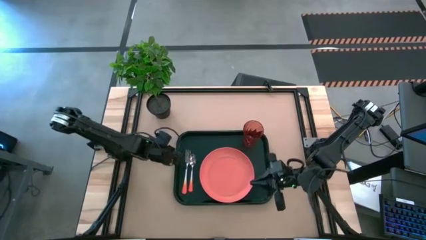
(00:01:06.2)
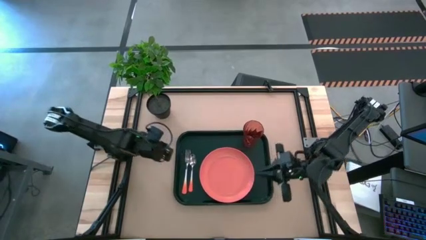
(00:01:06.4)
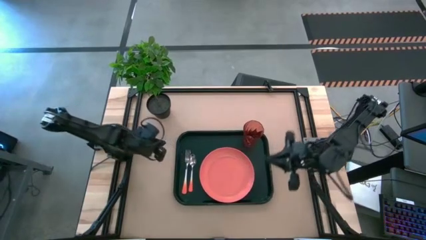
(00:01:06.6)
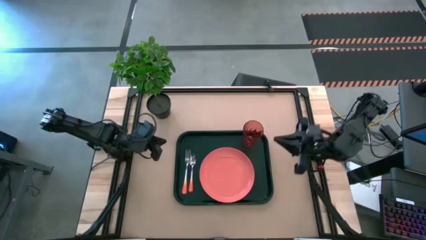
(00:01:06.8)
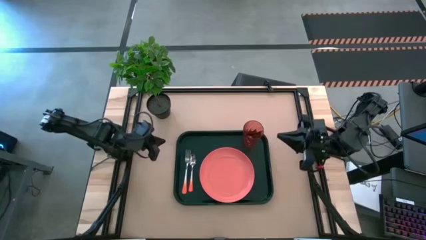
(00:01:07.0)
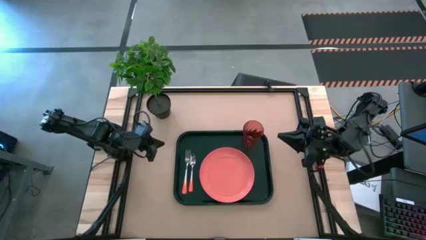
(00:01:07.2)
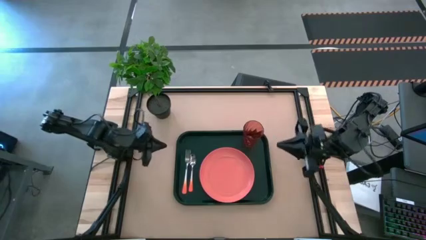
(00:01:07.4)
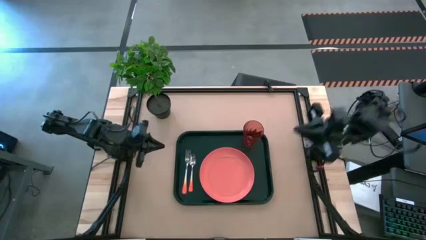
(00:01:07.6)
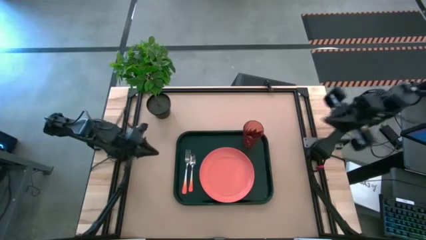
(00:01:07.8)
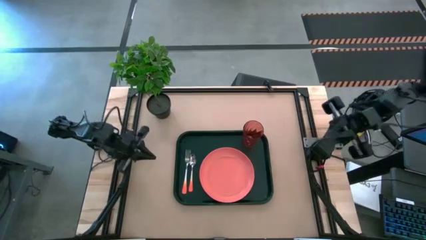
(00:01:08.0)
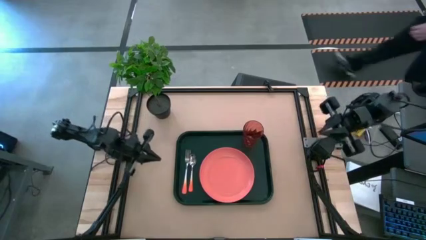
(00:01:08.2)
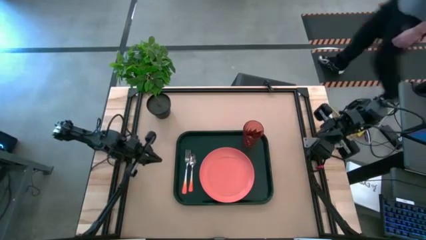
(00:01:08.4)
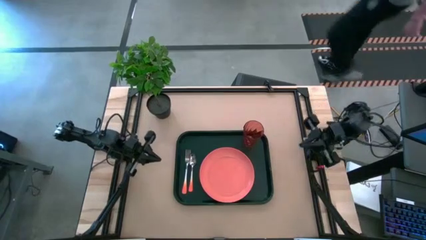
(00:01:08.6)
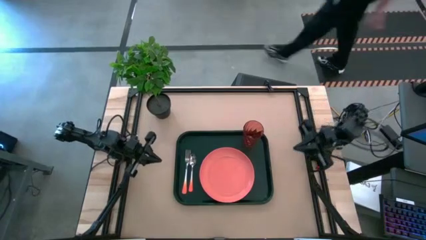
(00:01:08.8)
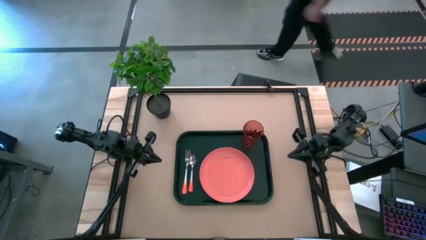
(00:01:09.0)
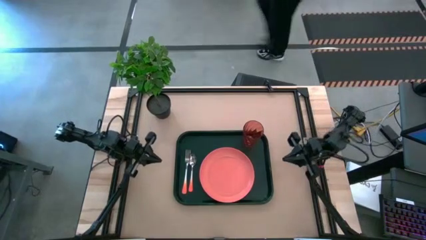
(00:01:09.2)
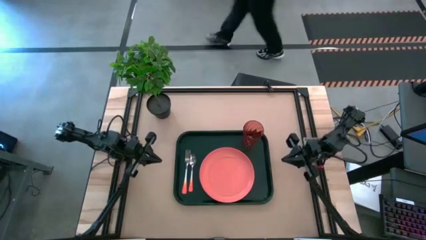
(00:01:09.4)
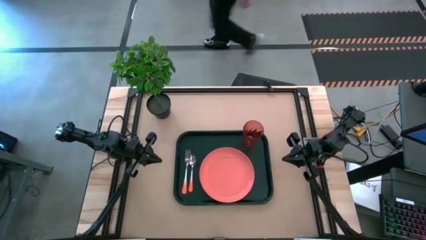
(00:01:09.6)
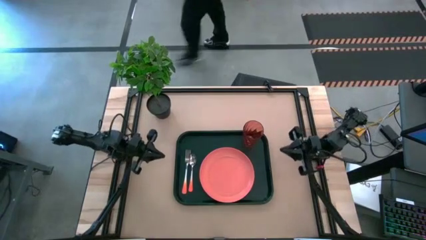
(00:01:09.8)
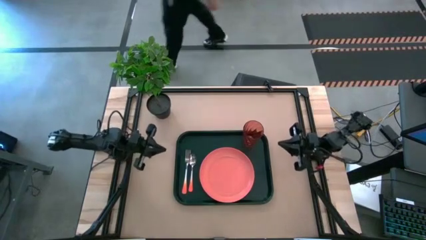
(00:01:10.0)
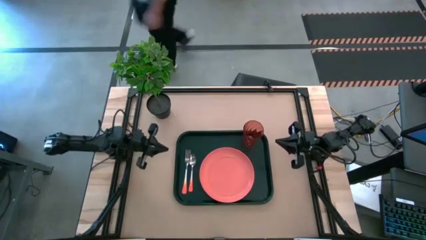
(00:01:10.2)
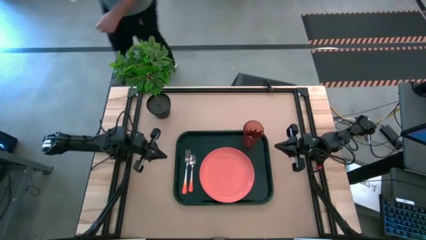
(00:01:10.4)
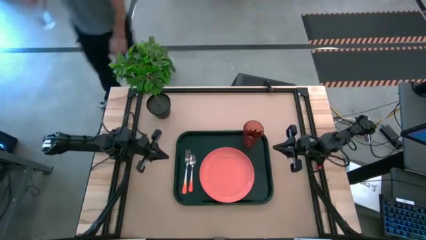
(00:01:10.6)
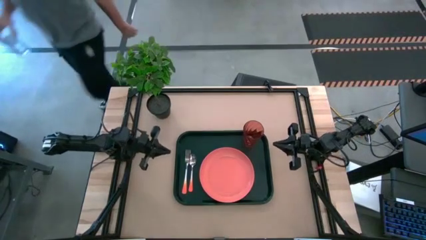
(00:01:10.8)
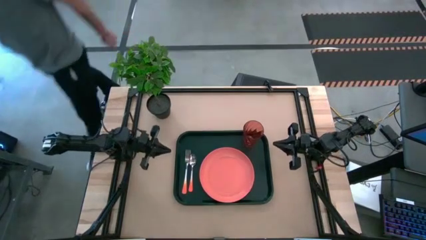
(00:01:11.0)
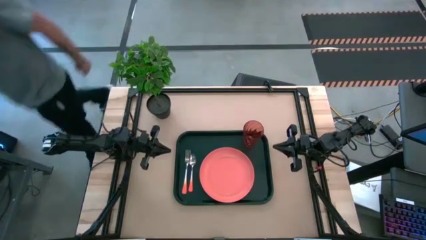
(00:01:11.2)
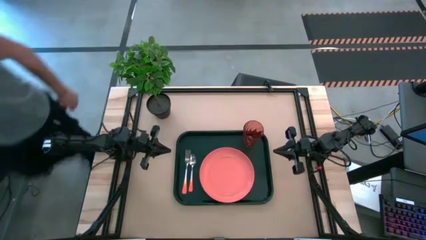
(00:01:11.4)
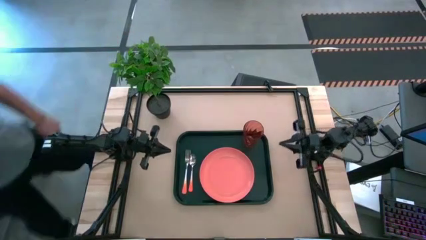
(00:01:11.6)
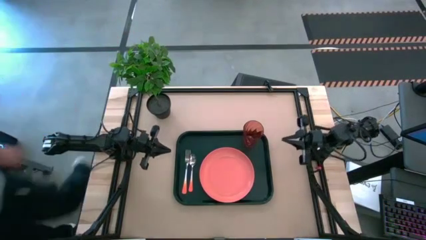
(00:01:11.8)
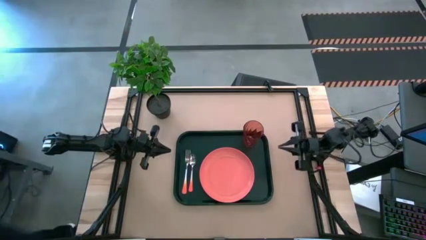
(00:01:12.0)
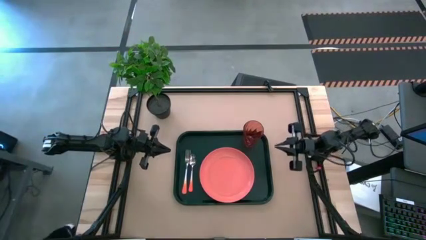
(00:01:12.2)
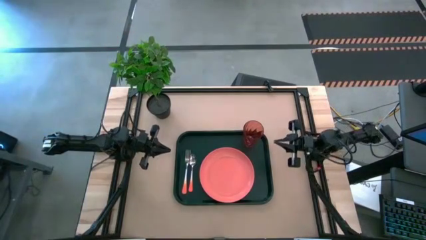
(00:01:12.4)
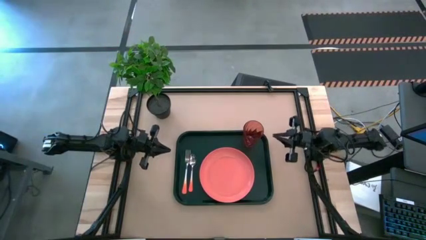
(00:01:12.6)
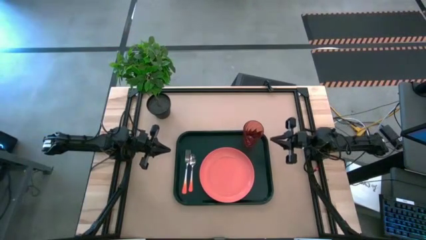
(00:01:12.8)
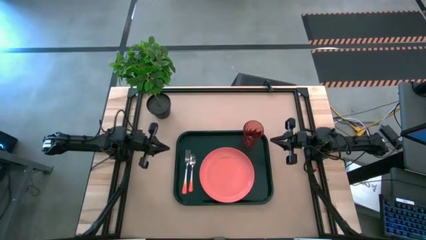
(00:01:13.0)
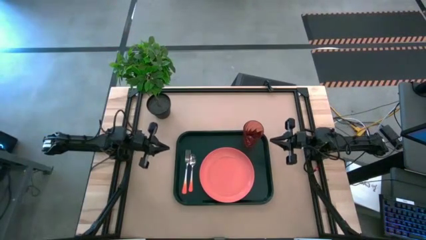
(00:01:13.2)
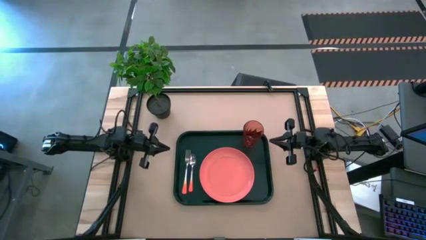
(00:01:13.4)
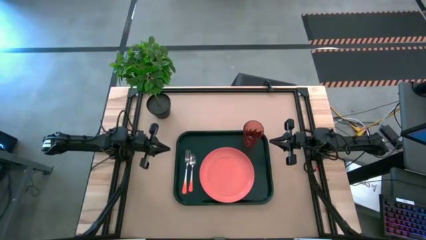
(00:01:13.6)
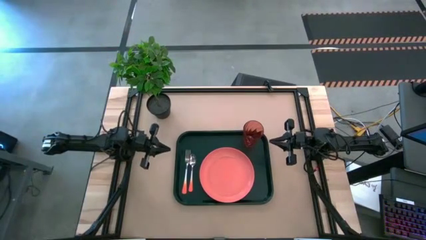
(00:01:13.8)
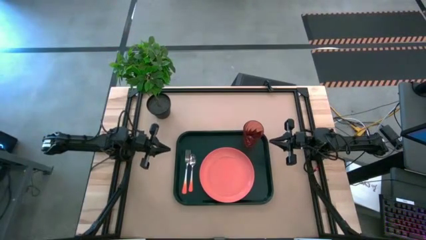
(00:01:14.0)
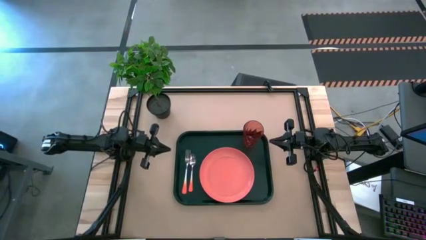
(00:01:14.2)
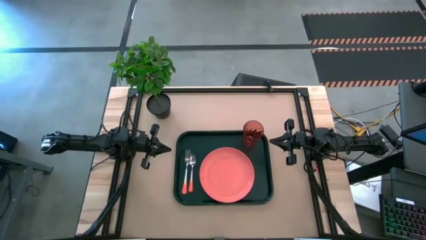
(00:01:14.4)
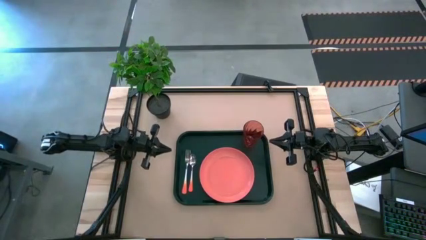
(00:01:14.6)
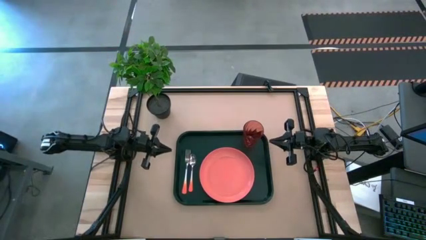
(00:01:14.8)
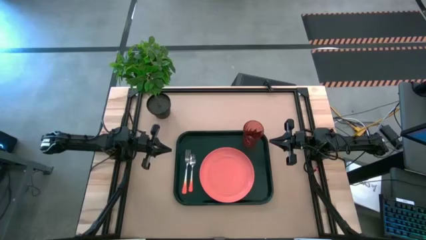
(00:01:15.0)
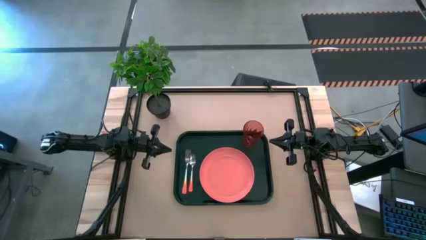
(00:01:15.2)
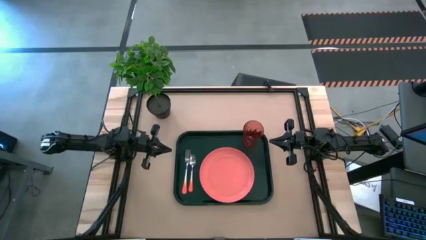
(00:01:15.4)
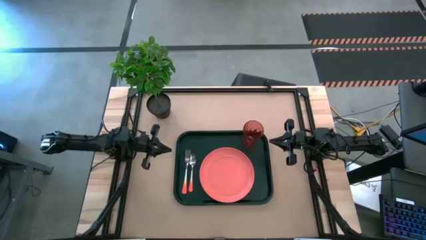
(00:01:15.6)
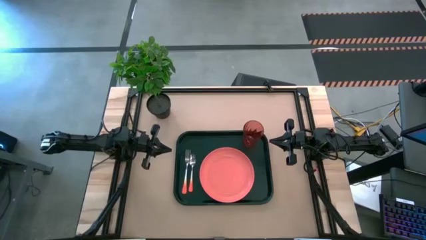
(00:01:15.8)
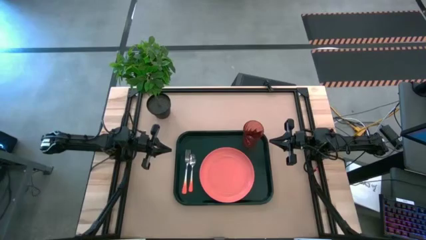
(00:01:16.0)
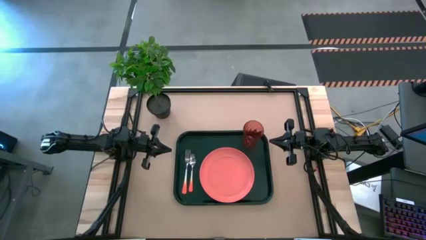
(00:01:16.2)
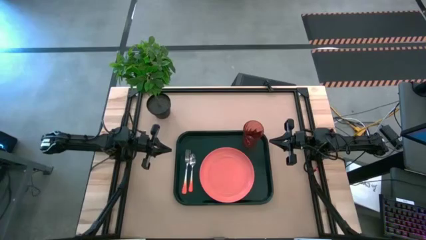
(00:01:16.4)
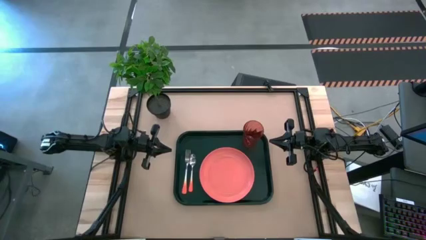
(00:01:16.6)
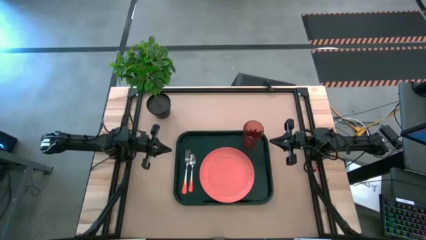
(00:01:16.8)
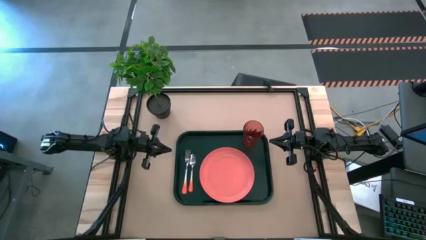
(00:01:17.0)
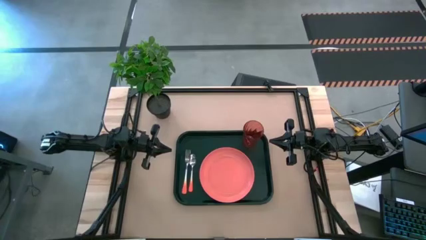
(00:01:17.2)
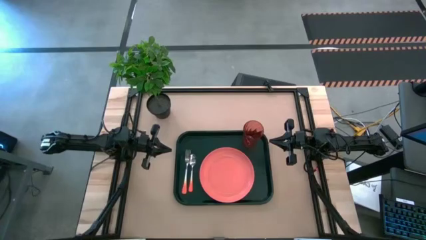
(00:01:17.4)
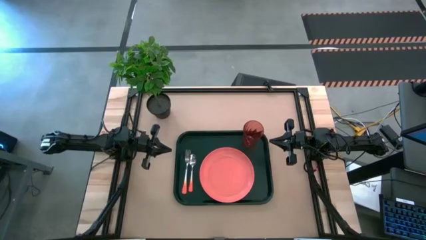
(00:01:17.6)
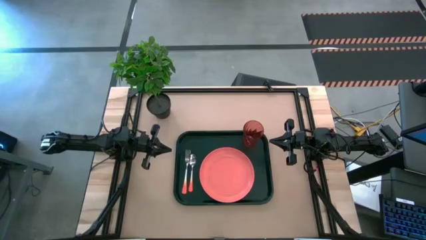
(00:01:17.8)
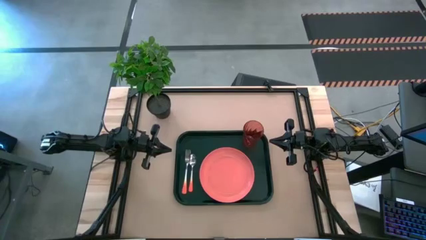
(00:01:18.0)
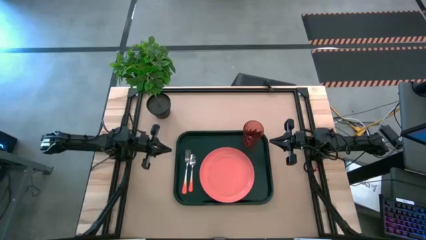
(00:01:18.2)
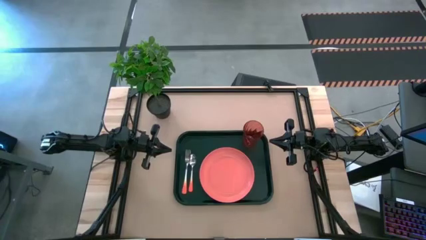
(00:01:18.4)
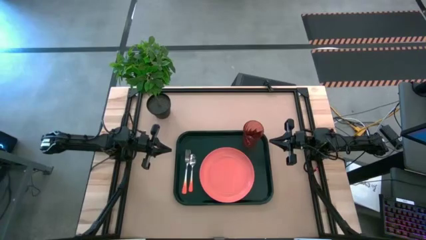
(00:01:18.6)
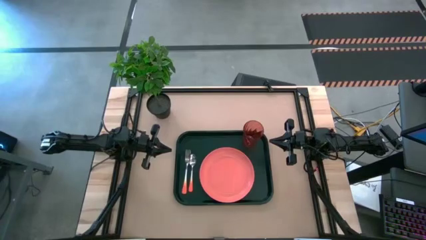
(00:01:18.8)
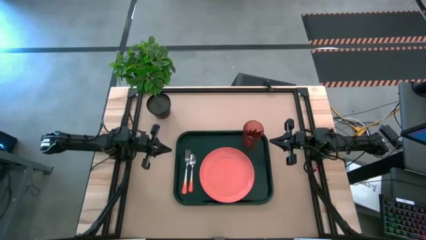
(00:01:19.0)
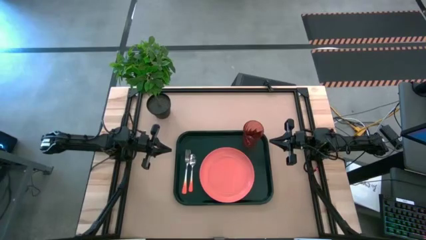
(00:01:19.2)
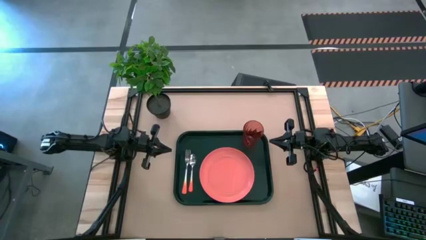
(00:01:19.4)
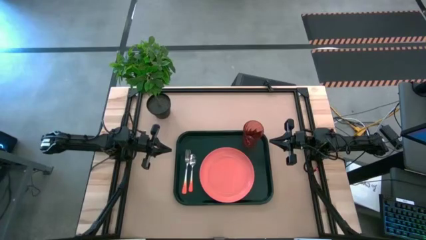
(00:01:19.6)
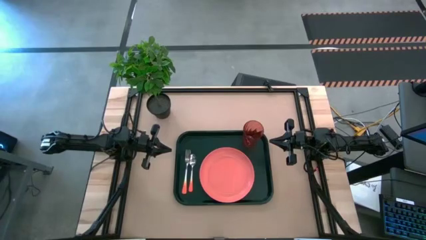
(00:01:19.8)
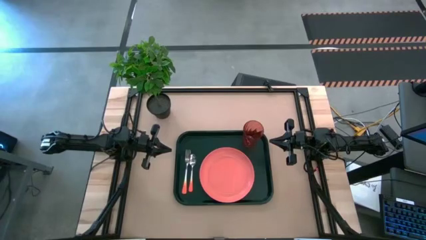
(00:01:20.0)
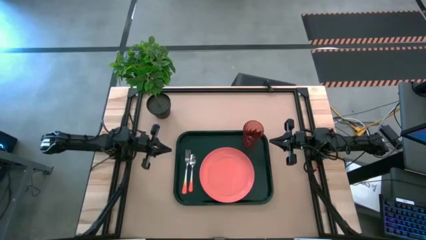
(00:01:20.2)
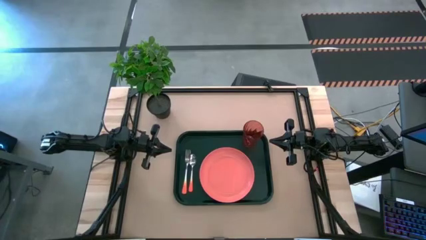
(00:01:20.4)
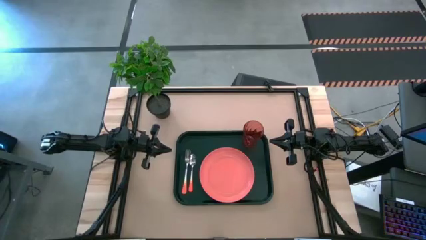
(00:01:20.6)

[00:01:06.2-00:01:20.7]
Task: Pick and place plate/cup/fork/spoon on tray
Return to Home Position
